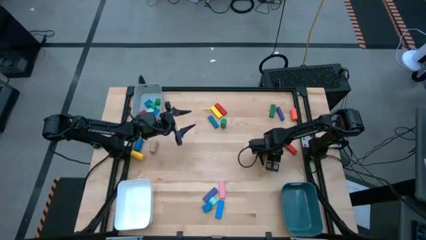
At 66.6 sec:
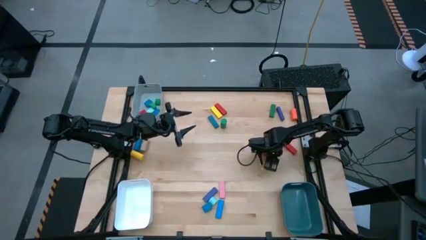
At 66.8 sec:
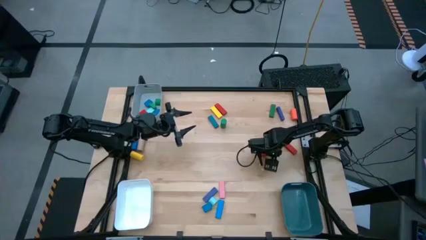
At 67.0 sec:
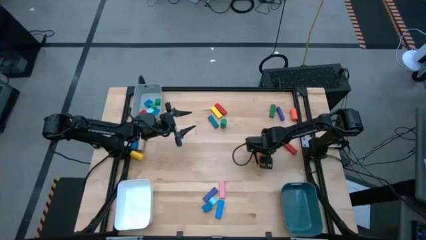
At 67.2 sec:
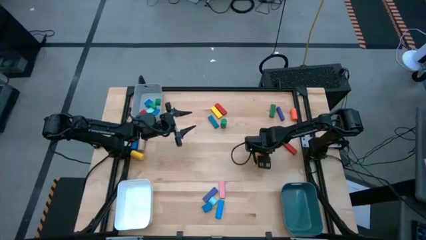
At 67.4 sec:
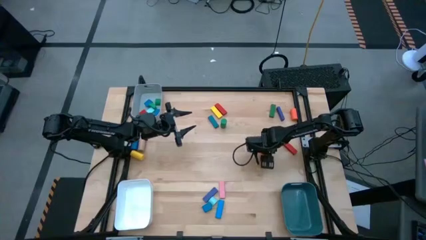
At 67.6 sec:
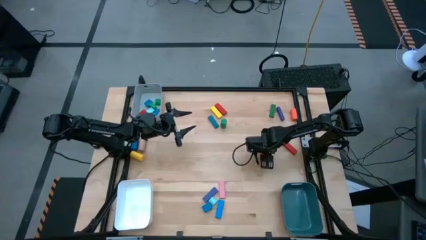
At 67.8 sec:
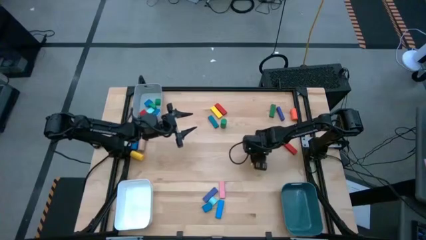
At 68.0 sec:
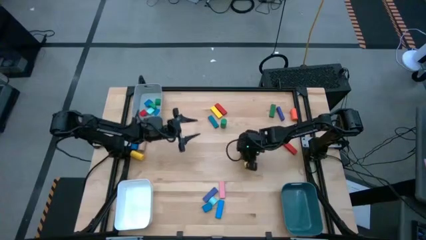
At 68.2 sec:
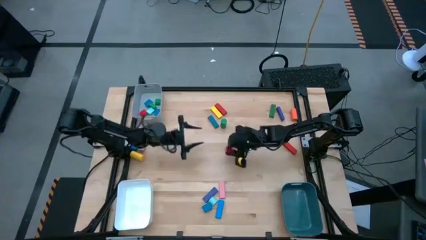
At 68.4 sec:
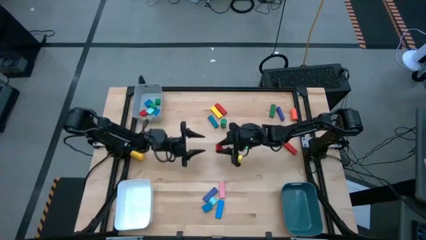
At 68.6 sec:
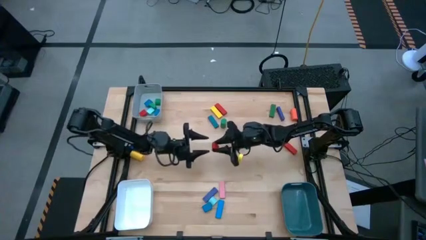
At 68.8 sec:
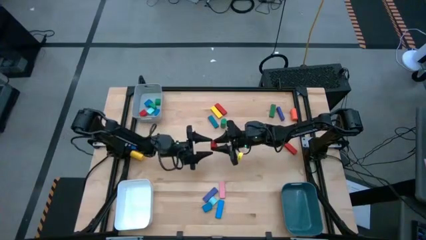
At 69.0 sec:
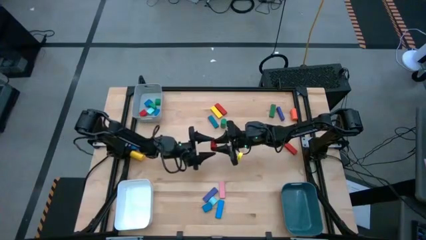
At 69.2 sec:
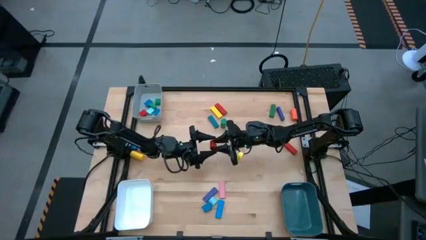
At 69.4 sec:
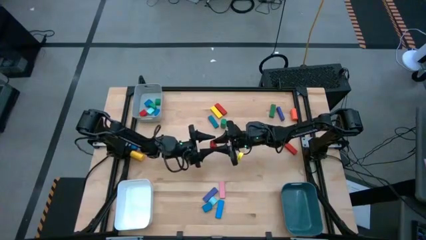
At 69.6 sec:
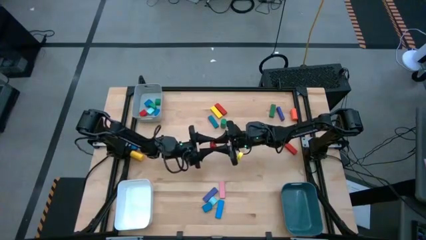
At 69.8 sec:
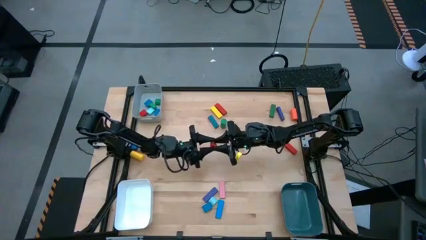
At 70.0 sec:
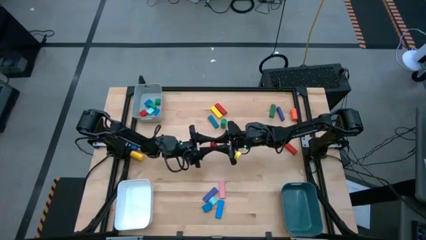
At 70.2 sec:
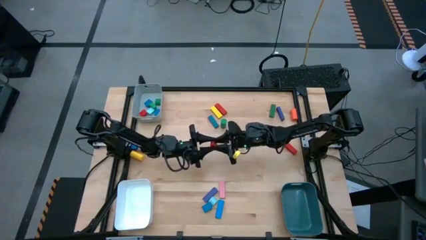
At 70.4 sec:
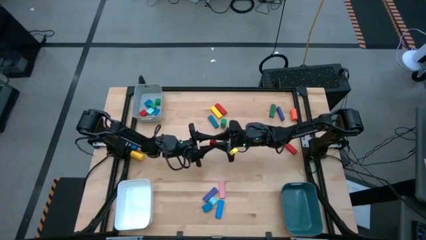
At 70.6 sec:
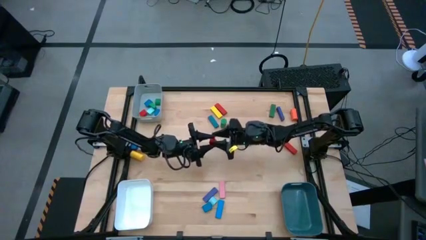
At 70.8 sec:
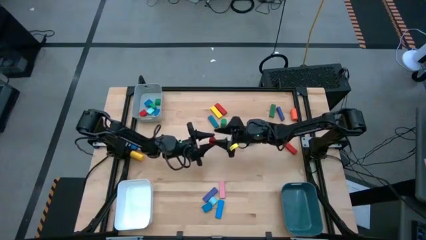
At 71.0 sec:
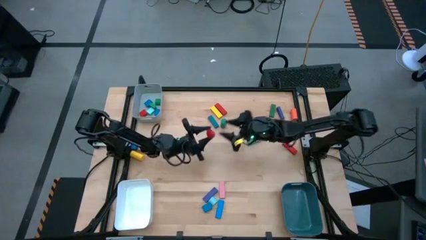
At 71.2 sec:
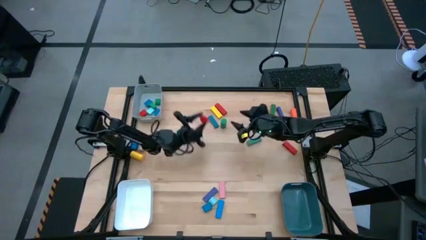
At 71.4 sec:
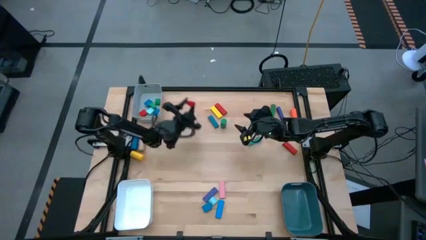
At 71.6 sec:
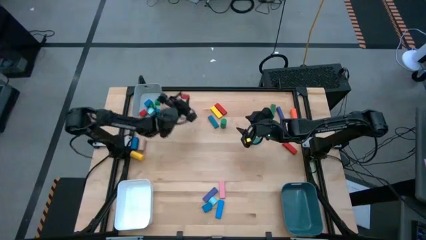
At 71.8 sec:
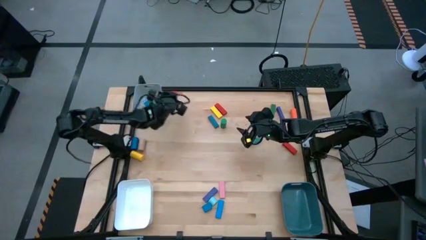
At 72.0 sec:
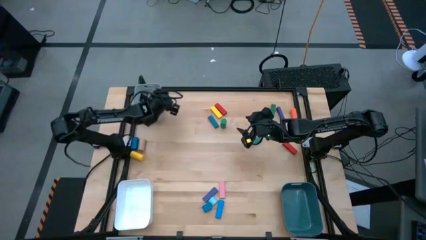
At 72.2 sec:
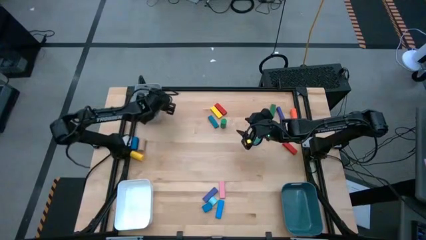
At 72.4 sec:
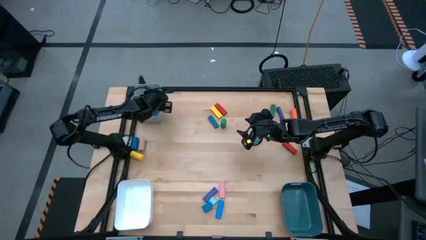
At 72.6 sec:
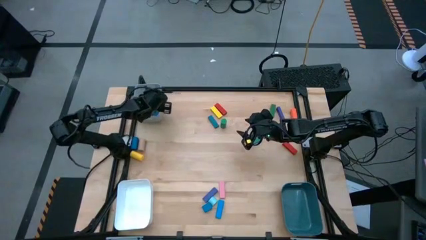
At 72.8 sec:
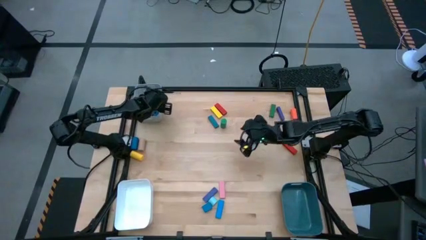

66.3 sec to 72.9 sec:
Task: Sort blocks by size
Put the red half-circle block into the gray bin

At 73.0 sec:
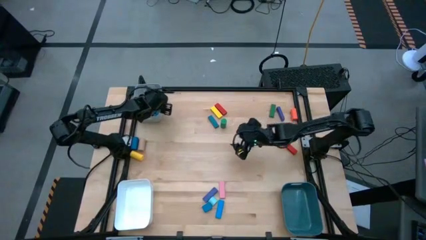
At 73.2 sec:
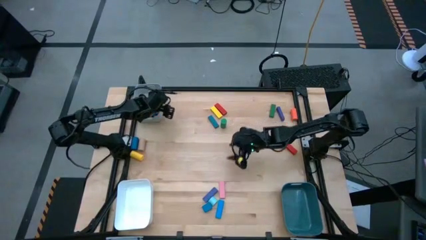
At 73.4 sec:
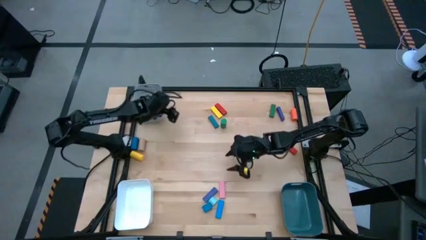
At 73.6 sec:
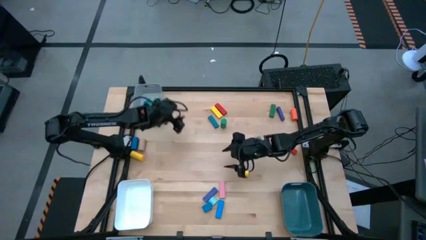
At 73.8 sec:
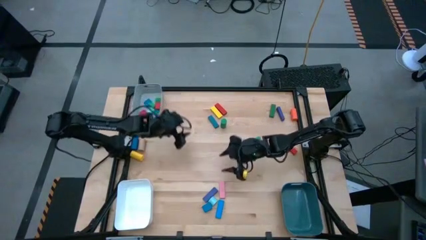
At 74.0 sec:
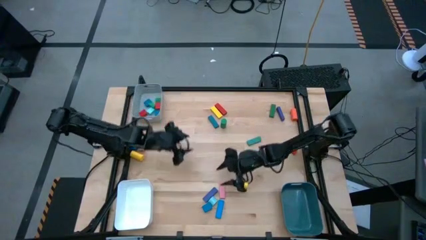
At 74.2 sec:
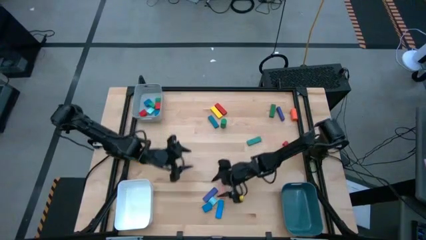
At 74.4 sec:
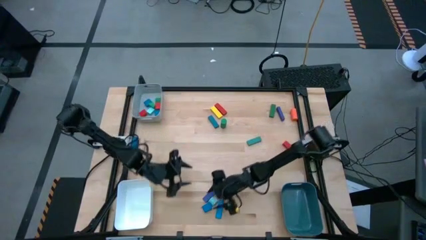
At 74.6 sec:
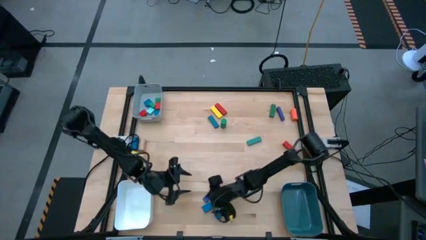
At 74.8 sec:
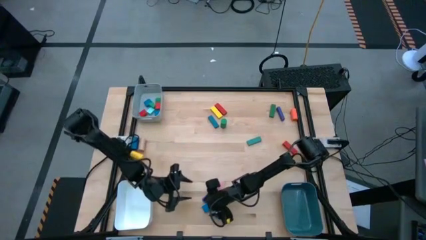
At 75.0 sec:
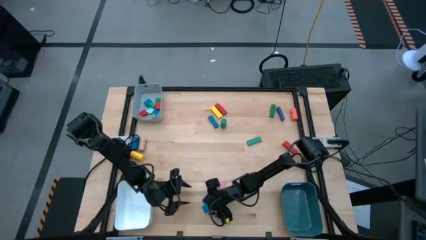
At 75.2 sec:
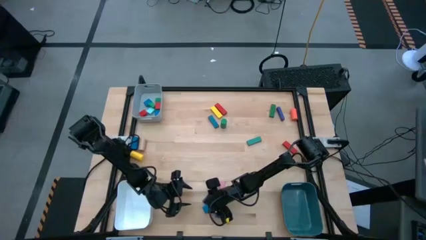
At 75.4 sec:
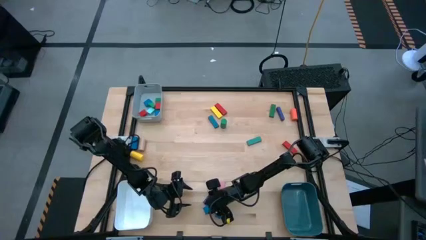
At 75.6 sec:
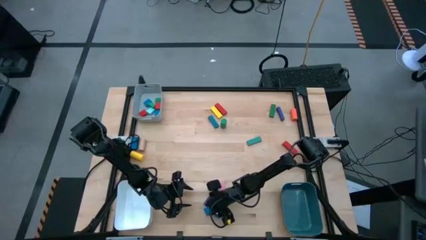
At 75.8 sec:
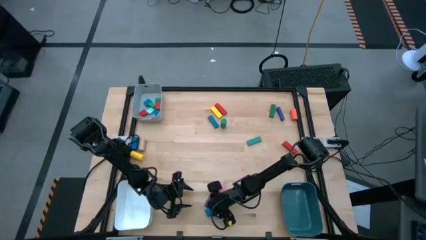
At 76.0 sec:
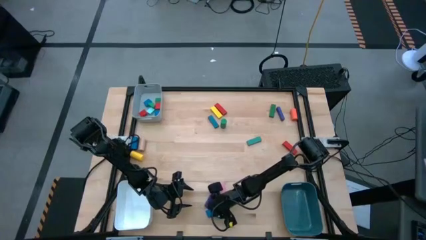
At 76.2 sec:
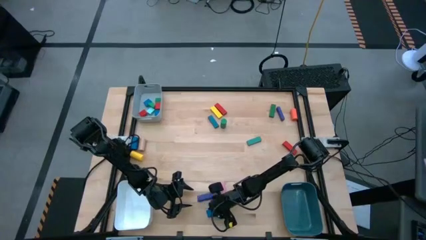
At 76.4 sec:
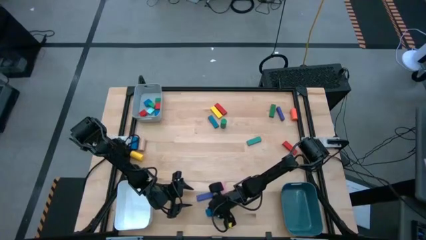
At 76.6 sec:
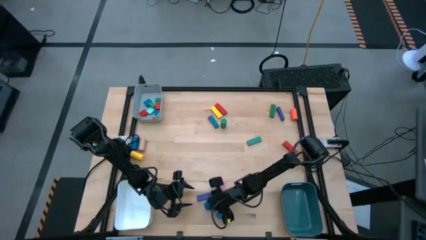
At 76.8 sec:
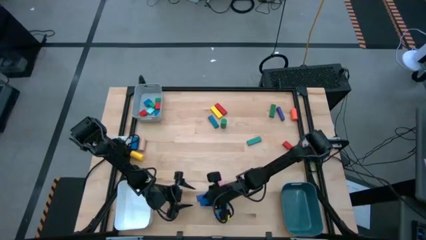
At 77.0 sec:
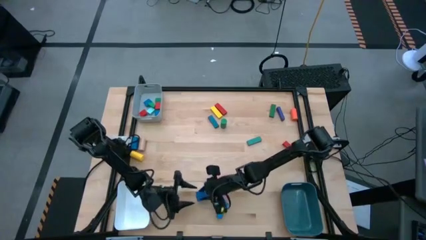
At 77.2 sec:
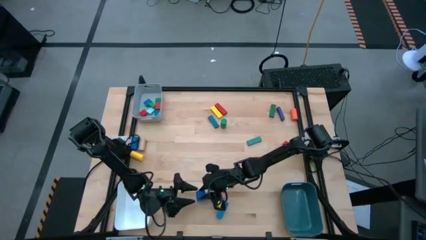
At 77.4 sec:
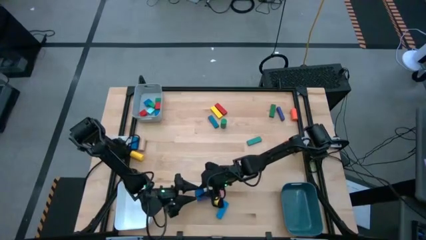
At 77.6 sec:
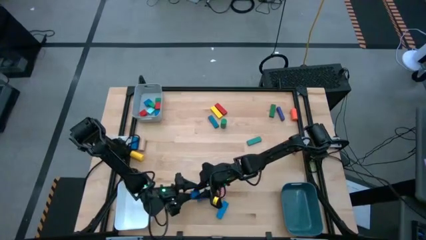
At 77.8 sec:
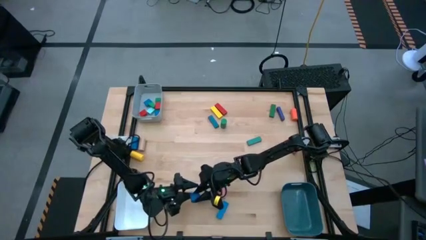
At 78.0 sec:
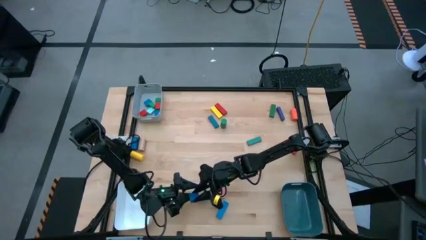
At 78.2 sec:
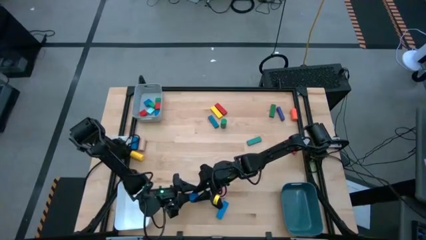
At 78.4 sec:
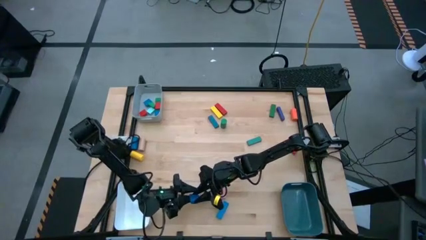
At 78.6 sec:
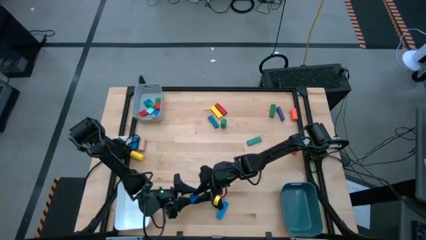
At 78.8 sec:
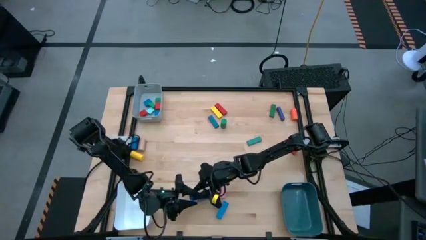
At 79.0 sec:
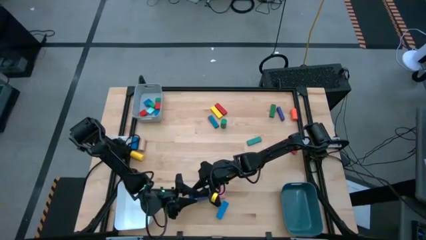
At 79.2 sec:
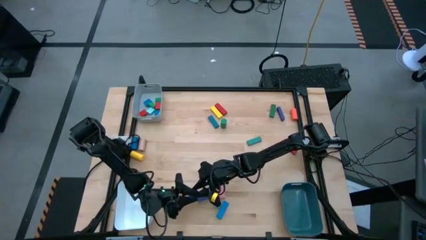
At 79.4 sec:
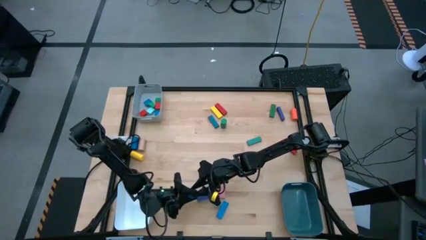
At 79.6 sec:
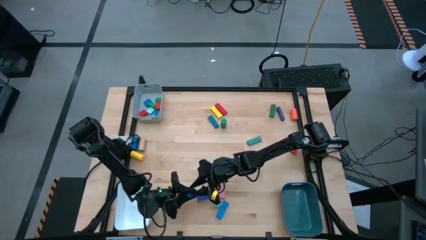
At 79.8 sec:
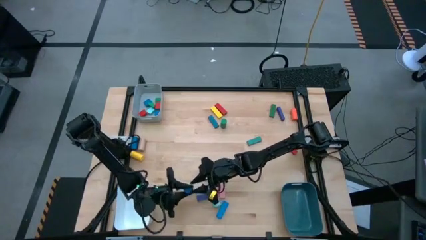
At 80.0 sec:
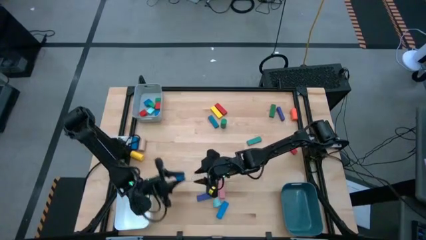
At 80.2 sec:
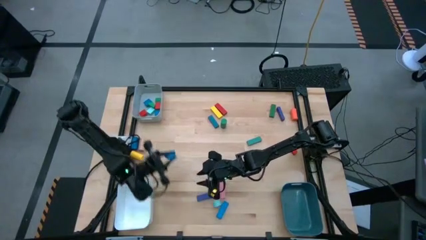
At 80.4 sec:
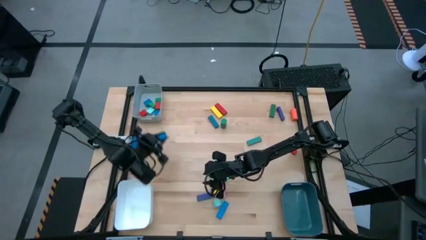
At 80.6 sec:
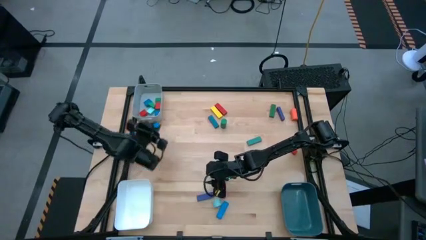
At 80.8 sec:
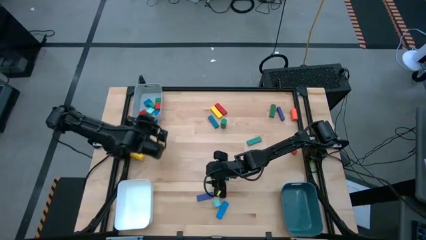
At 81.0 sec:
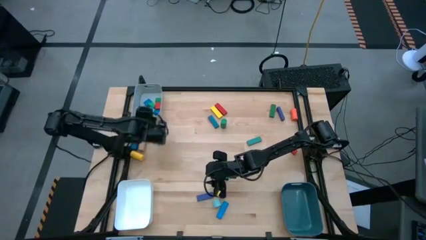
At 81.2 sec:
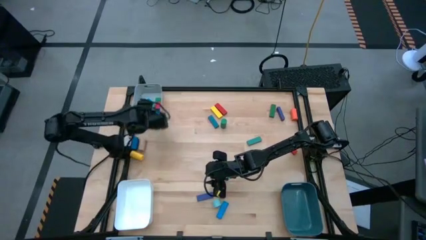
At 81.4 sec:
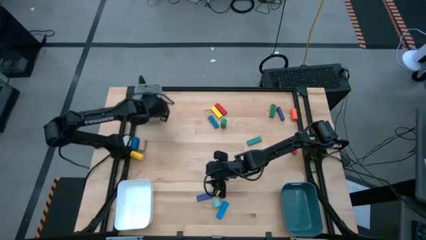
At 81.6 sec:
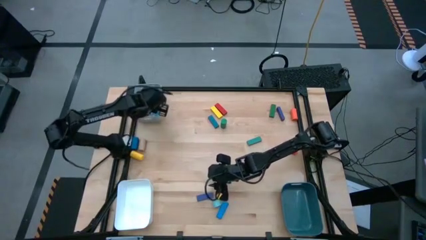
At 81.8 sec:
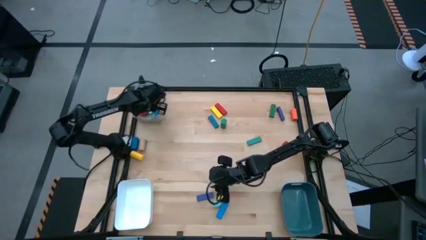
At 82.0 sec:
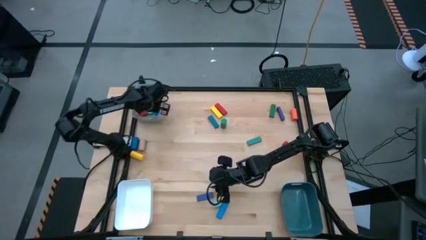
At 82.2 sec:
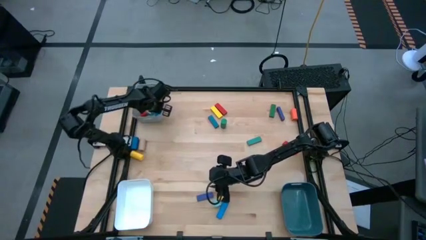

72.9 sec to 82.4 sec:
Put the blue half-circle block into the gray bin
